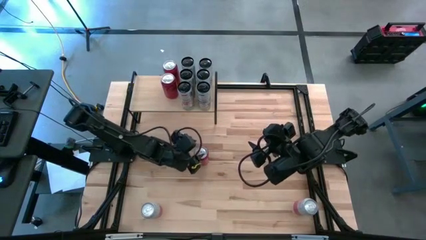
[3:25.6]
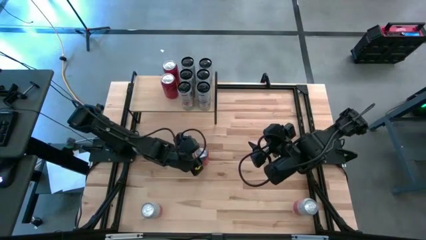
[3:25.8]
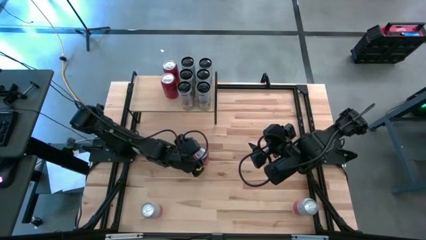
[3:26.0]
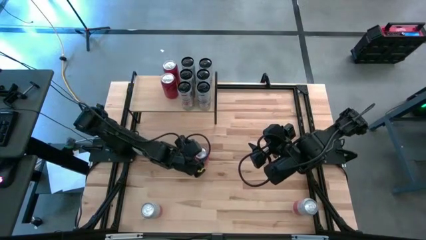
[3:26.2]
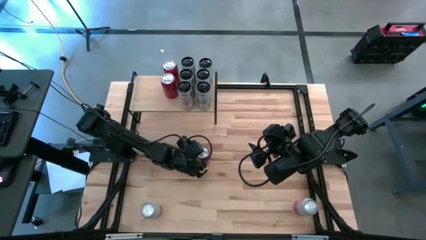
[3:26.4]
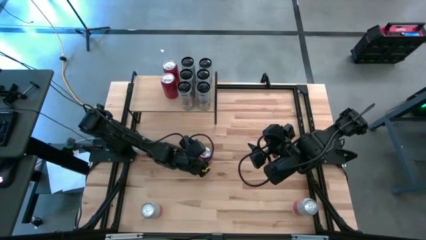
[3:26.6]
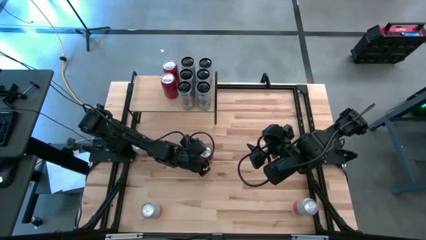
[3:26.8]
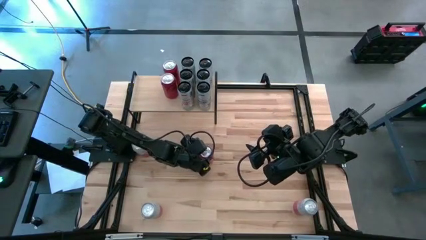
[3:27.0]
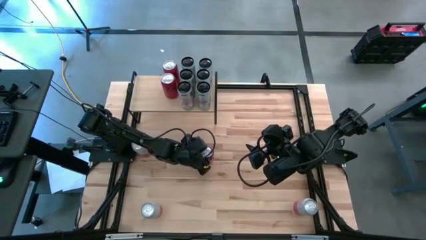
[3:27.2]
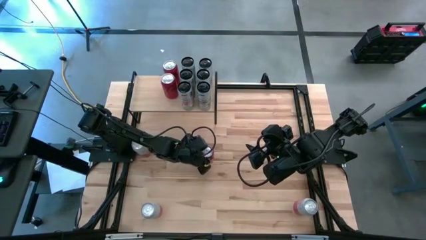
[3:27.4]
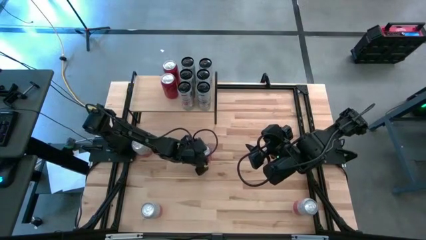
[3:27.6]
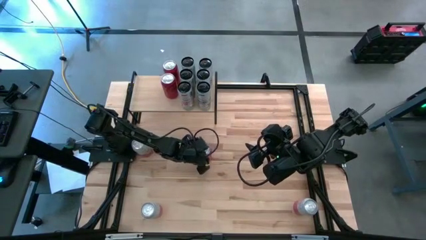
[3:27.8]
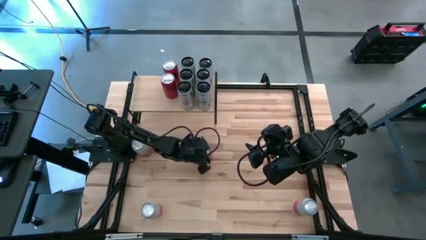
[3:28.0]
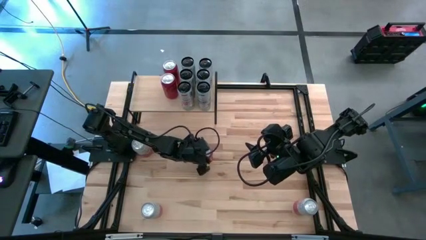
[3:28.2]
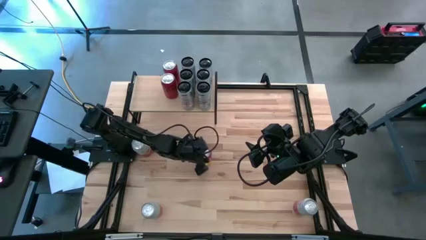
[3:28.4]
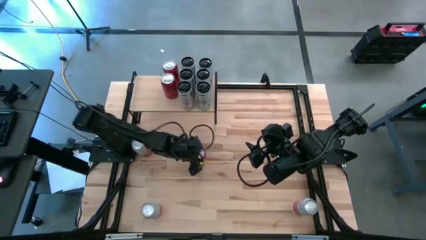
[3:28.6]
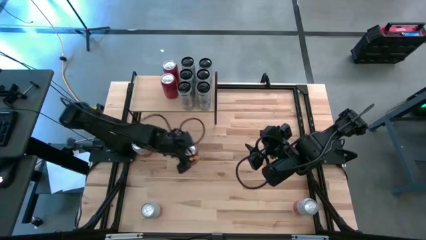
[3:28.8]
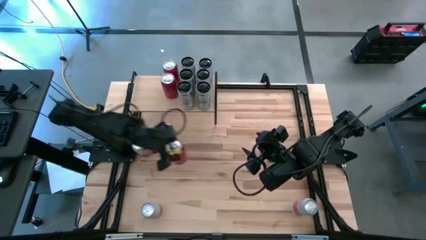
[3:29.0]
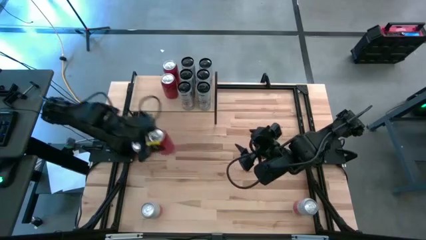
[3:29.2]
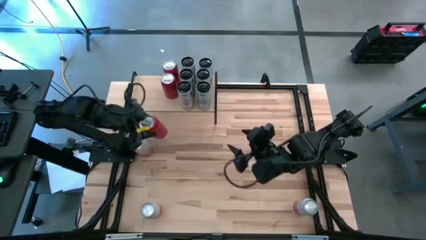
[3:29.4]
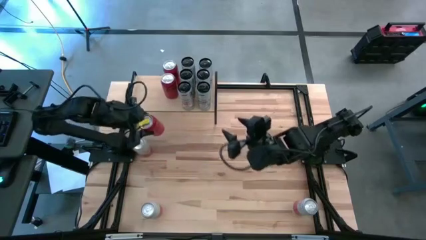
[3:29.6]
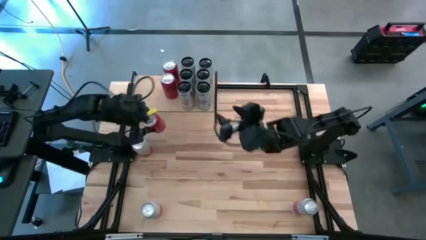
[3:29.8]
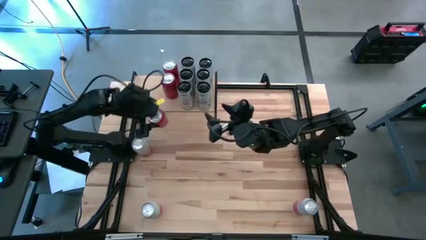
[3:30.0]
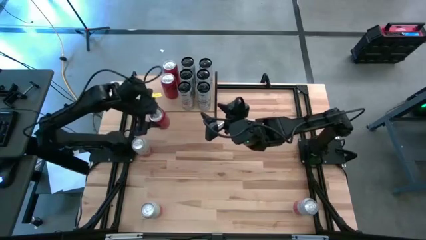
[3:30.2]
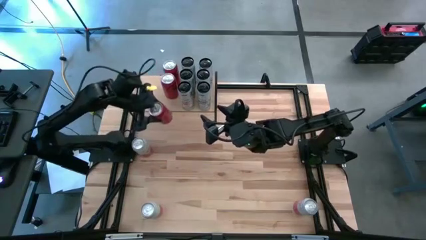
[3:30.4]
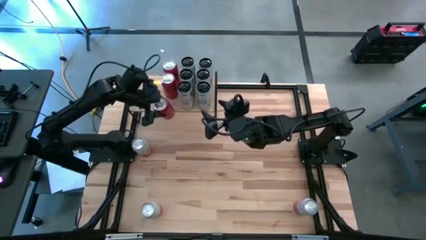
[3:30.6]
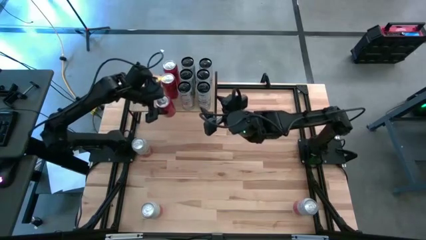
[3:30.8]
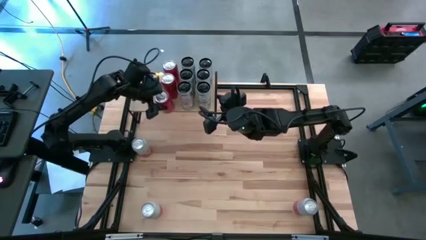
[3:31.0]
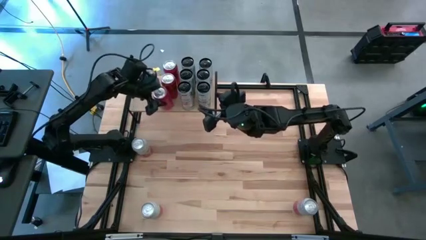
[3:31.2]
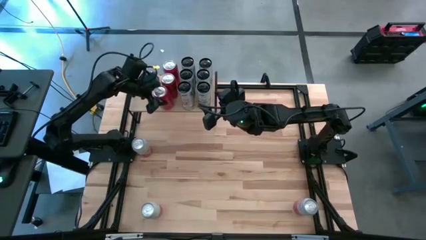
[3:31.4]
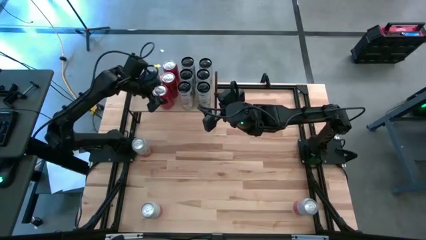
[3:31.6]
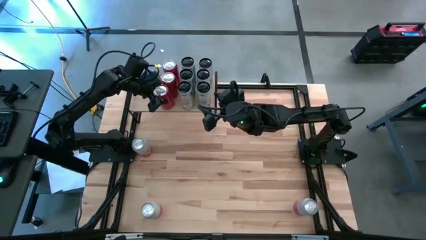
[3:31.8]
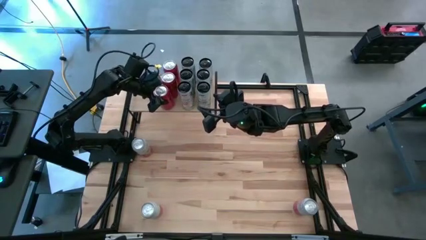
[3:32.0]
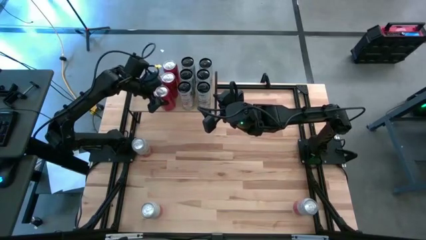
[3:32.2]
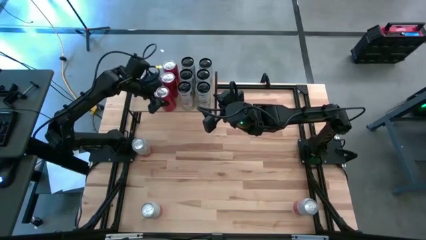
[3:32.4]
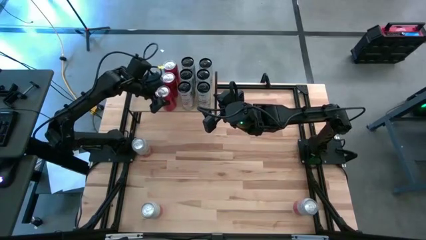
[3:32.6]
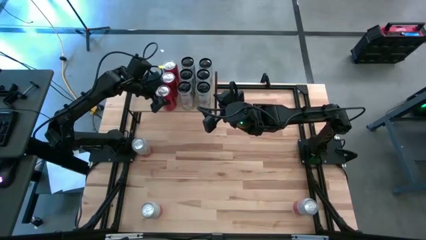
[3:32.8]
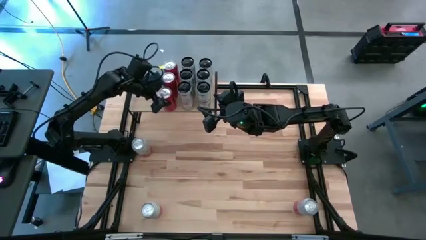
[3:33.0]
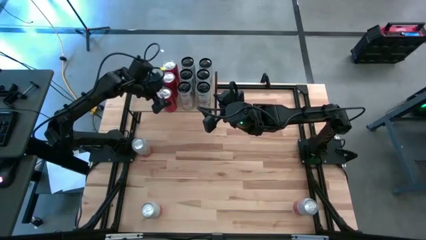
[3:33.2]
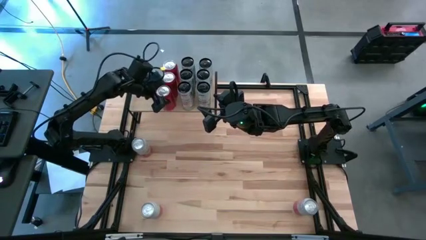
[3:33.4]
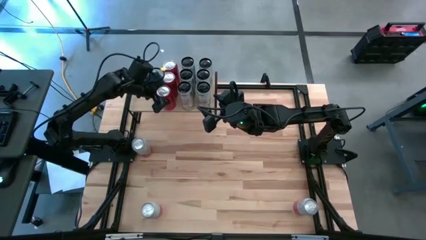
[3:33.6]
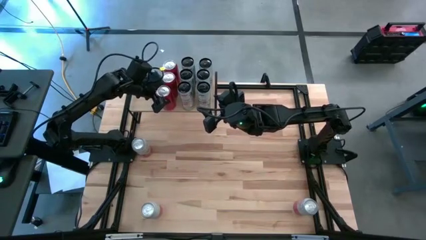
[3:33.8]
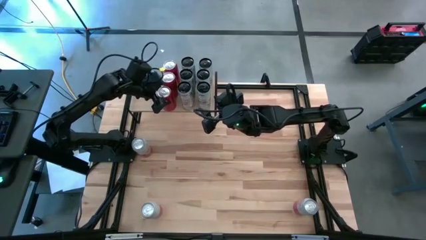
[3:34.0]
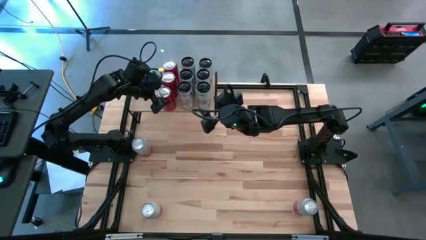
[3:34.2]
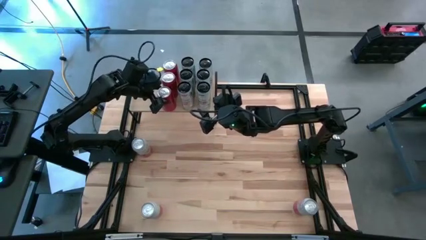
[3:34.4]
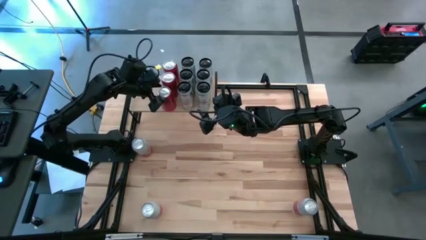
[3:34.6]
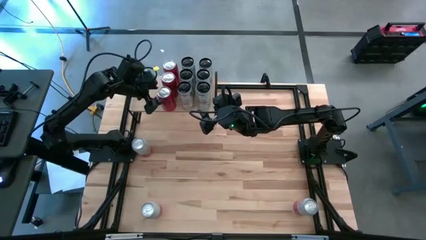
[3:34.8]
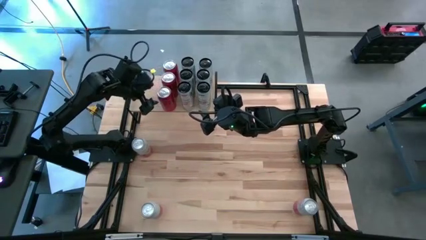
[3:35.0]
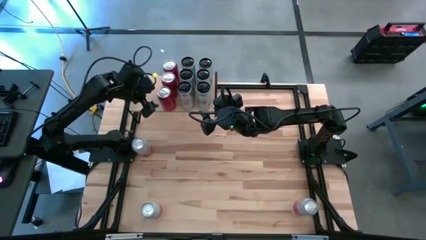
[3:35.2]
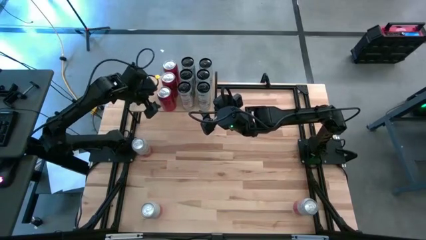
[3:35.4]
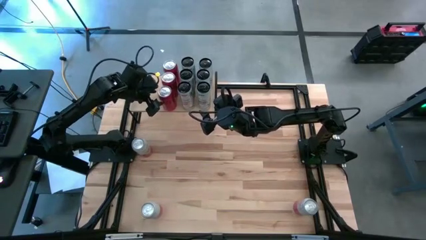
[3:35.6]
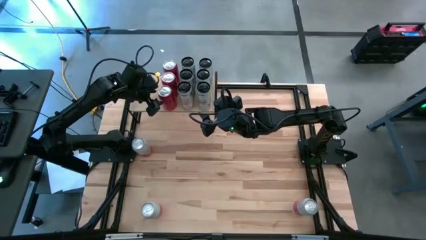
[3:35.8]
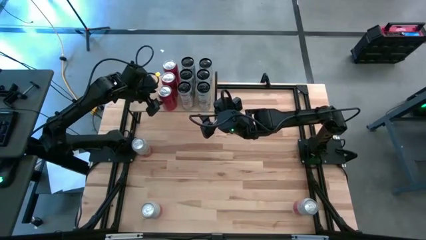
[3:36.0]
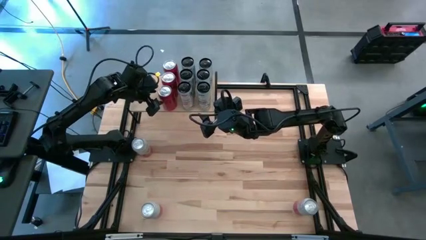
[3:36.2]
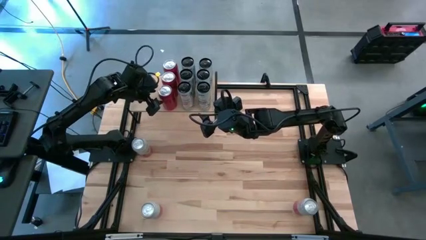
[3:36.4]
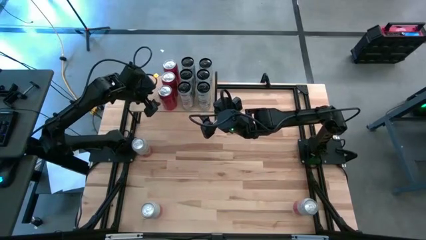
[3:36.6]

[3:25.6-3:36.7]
Task: Place canned beverage on shelf
Put the red soda can on the shelf aligned with the other red soda cans

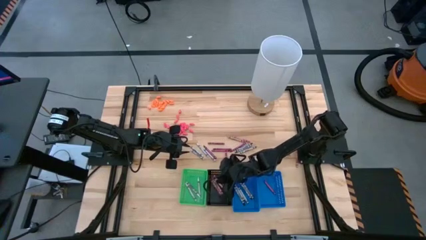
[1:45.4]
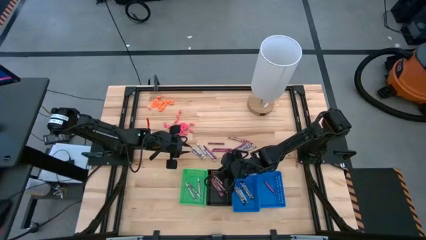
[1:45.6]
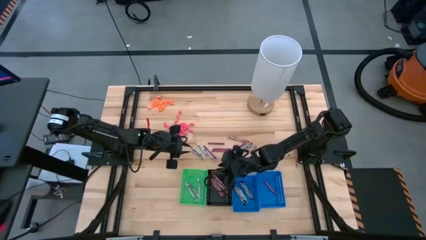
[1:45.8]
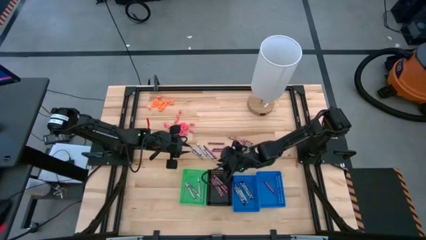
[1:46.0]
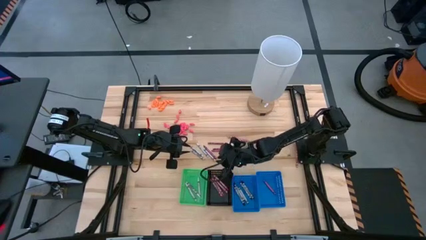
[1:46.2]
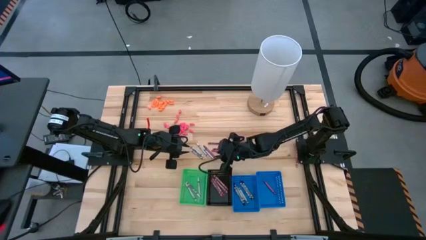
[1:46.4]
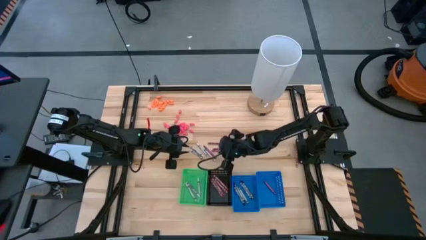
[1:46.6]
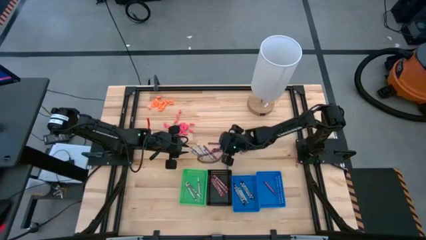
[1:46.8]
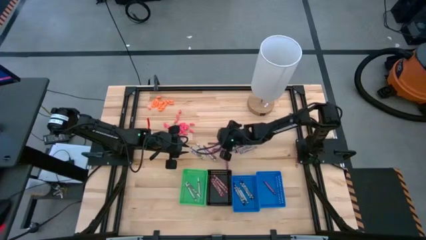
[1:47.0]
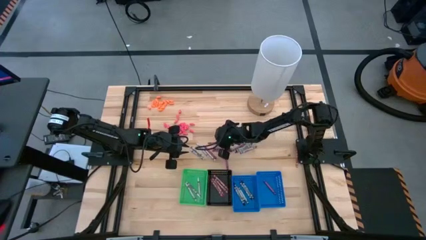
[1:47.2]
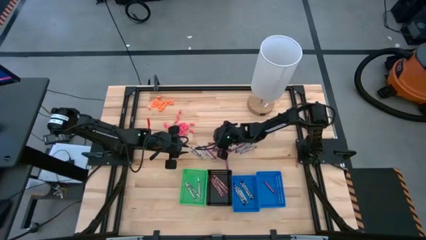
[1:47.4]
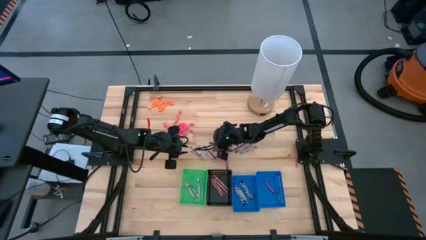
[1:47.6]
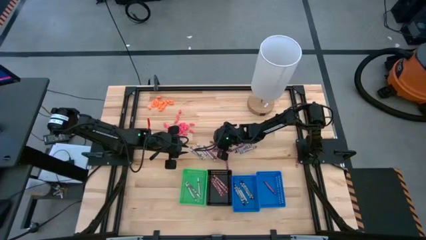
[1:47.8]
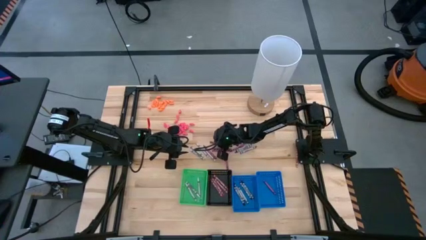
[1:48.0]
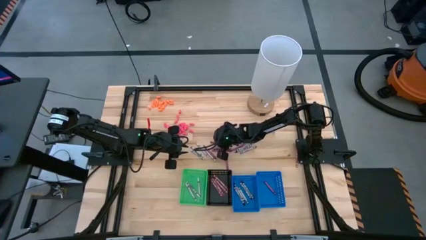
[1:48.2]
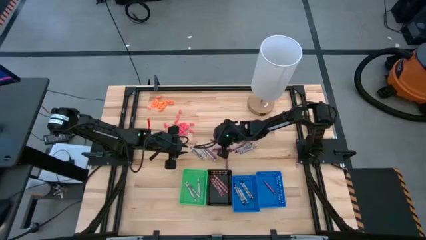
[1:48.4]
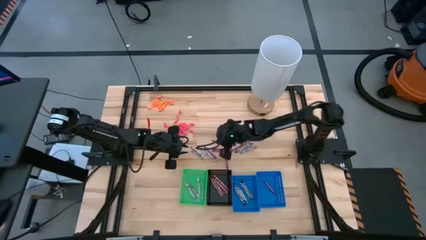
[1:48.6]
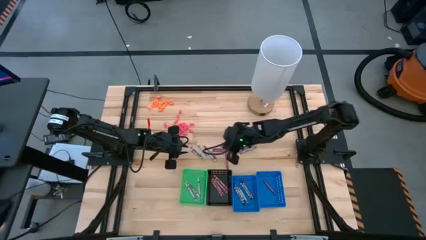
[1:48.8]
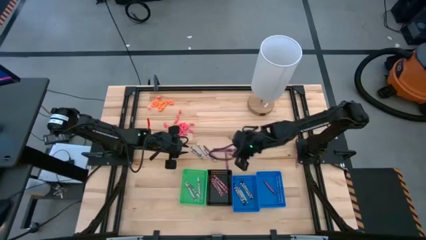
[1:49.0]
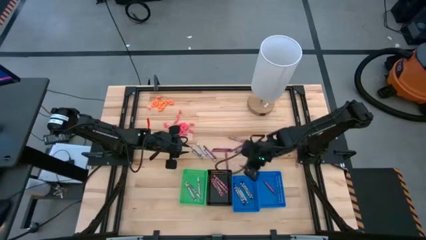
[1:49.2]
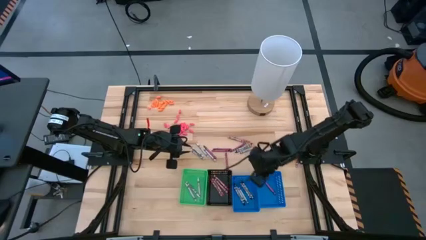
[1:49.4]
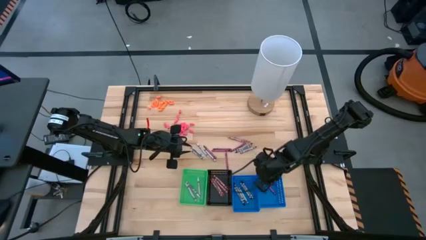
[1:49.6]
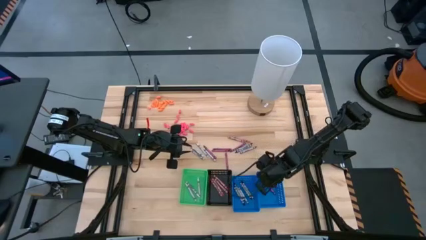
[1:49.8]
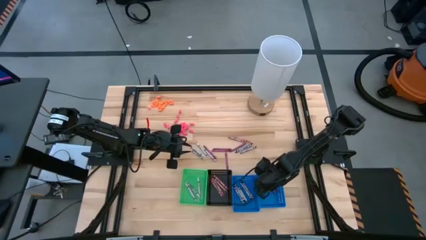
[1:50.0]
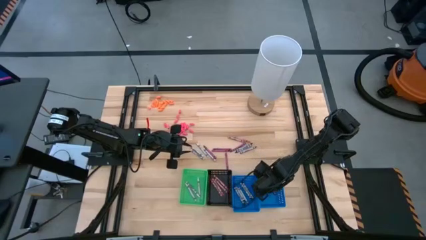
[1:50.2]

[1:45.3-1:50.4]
Task: Sort crayons
Put the red crayon into the right blue bin
